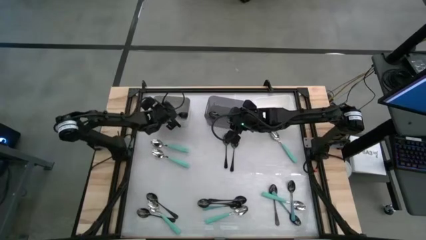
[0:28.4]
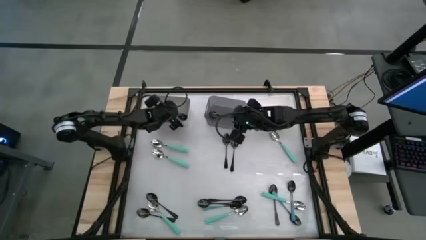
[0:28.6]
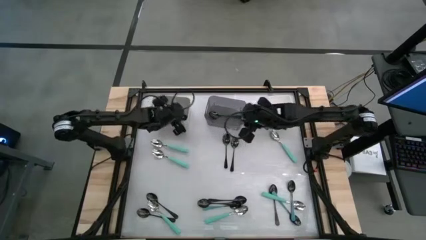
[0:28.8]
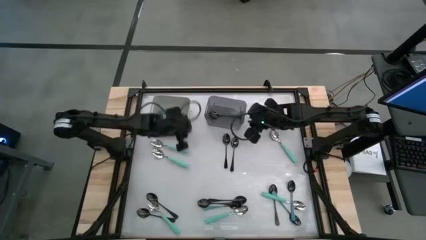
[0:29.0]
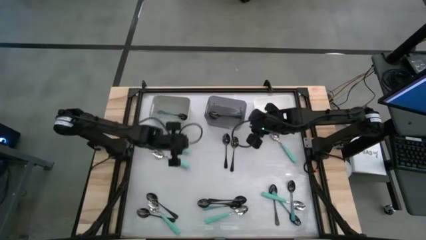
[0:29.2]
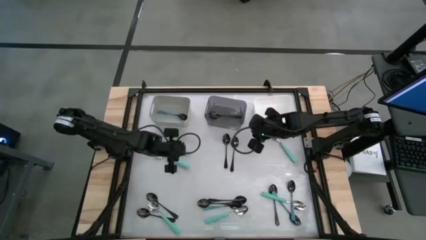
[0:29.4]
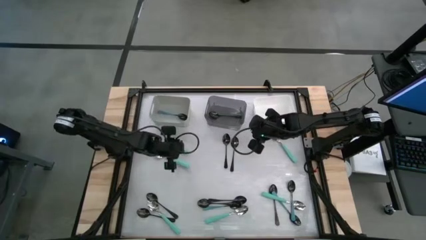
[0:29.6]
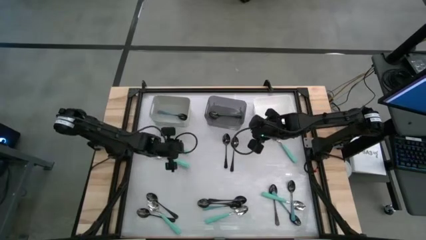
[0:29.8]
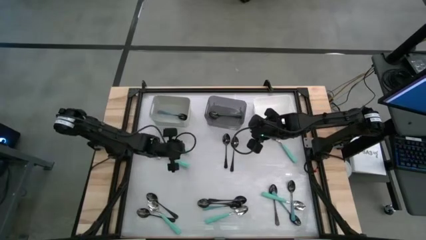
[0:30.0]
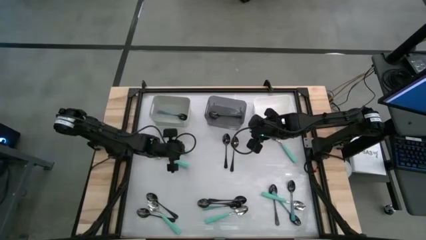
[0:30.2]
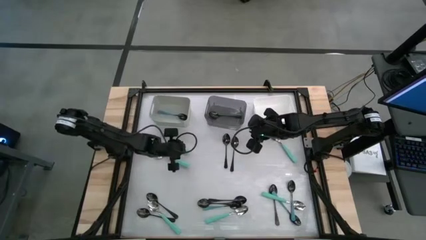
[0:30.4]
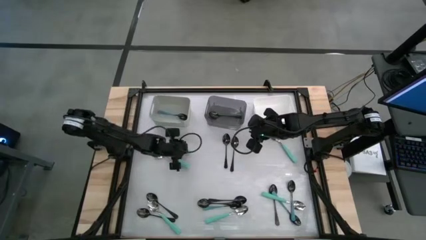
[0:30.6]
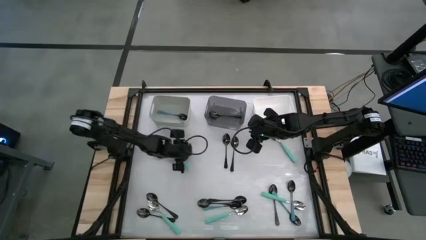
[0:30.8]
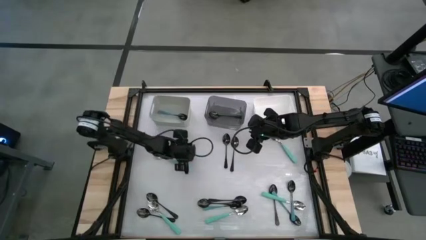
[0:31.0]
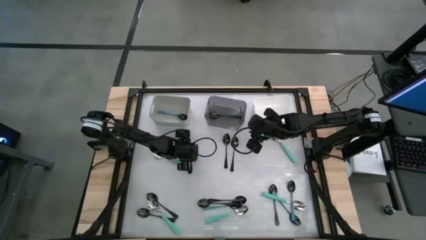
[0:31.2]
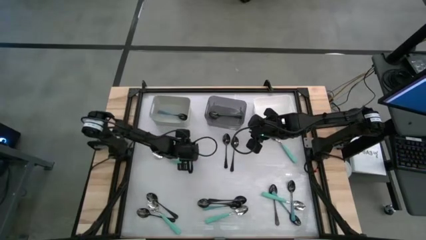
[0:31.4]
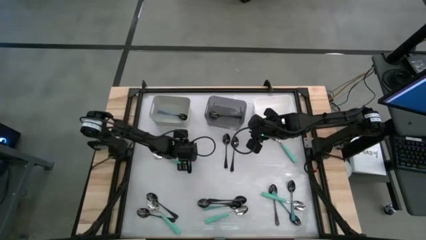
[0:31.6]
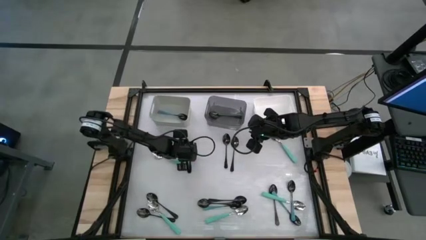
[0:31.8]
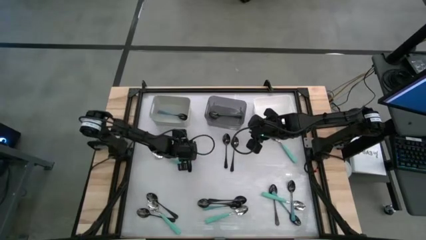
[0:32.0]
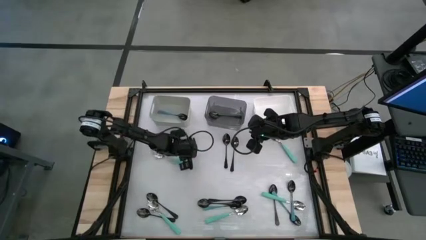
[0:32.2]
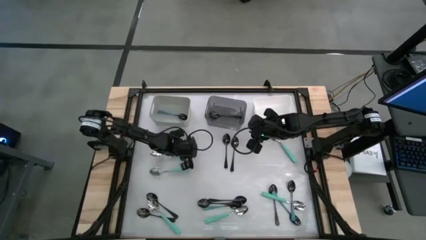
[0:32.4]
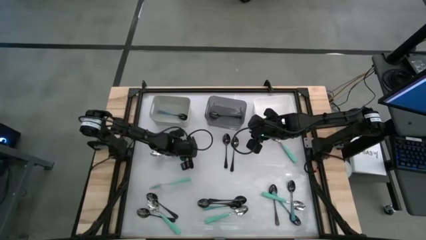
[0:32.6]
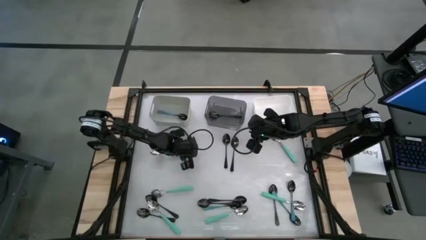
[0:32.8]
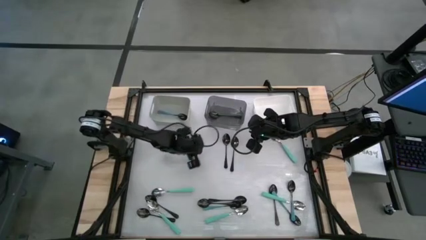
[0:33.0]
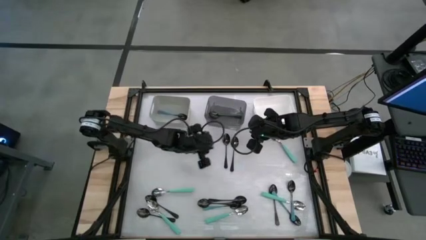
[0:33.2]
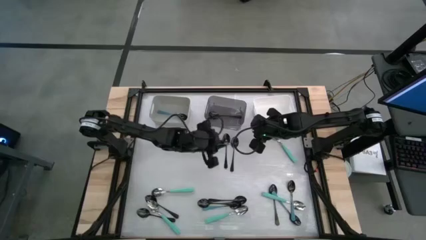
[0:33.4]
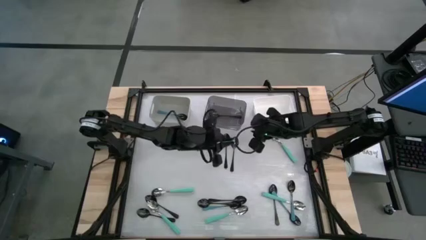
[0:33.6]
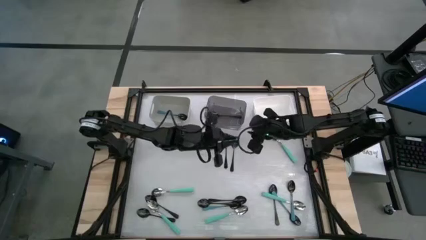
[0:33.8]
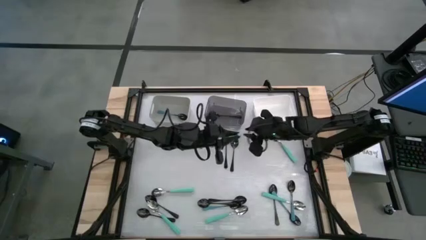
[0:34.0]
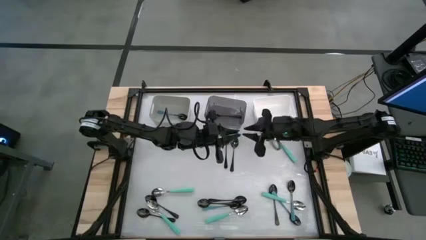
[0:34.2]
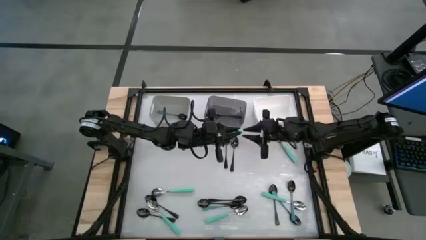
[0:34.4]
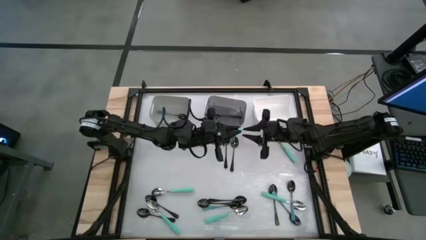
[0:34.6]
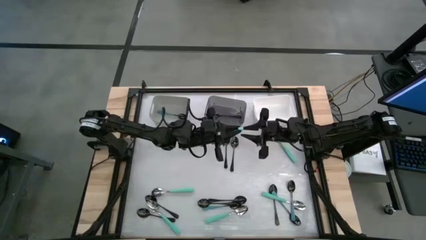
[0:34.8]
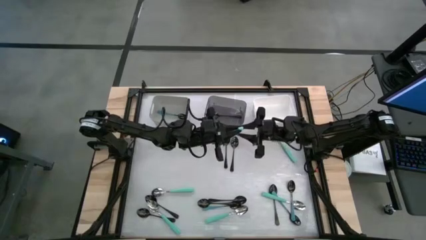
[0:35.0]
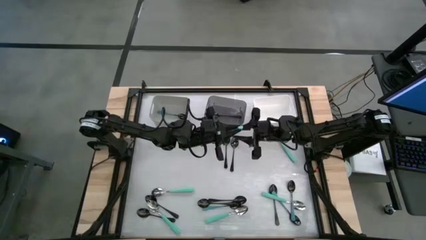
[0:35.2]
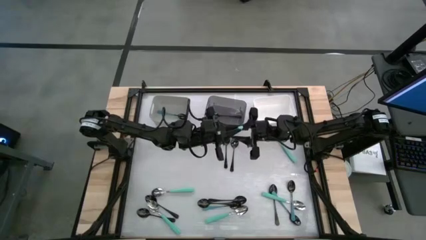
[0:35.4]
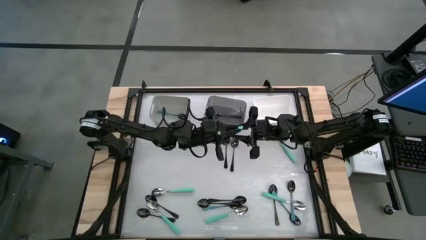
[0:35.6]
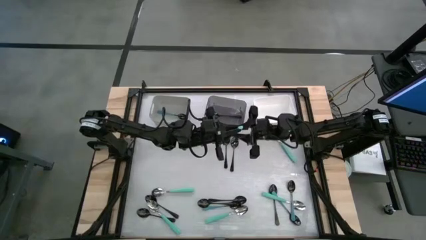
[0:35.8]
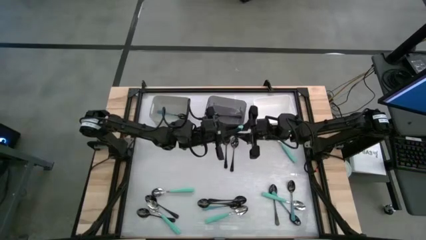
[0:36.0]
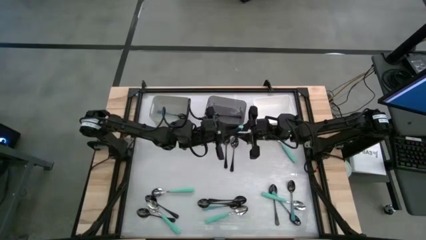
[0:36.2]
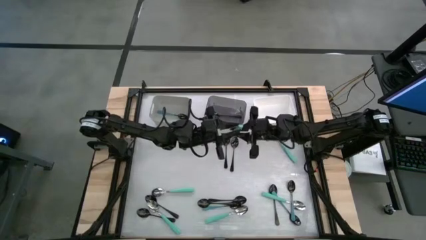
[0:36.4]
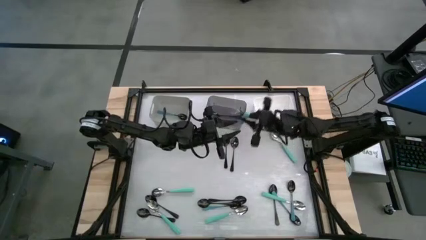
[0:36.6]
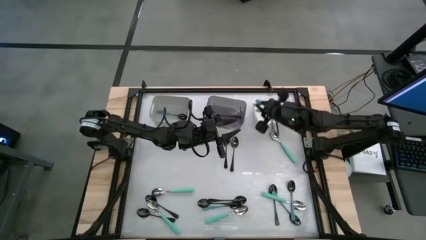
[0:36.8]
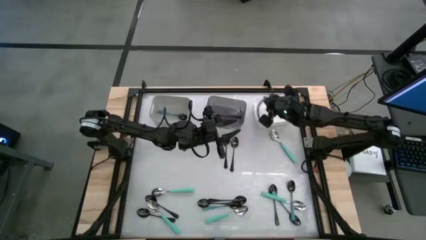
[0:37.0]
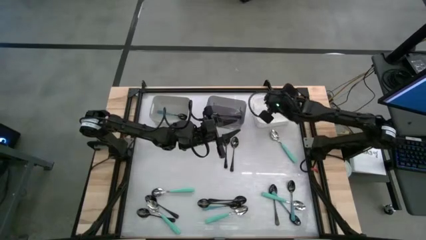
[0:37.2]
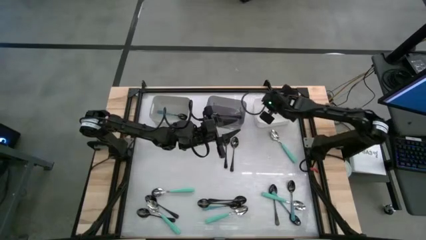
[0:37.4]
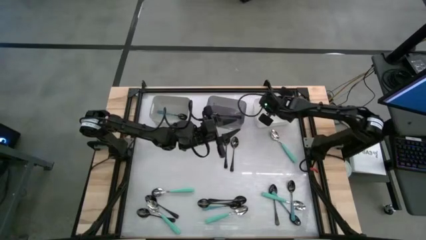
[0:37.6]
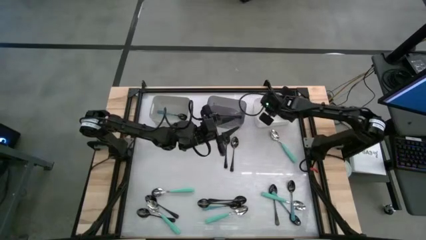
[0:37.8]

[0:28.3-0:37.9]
Task: Sort silverware by color (type)
Put the green spoon into the white bin

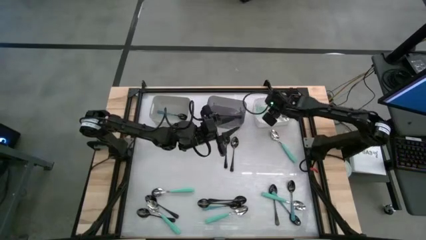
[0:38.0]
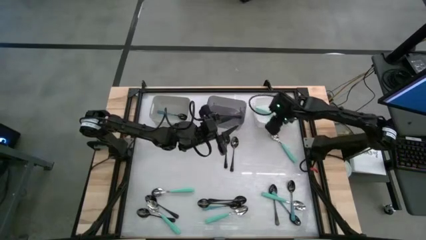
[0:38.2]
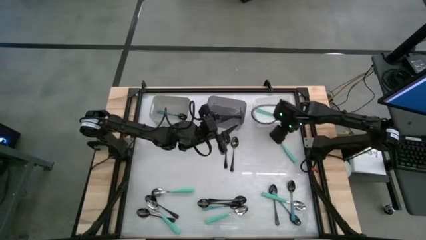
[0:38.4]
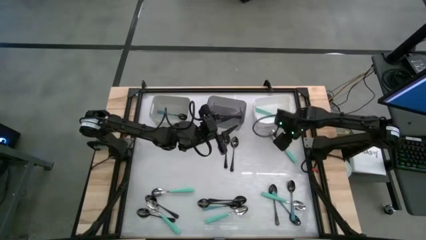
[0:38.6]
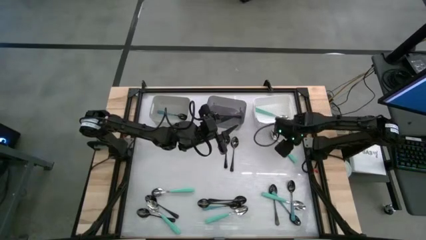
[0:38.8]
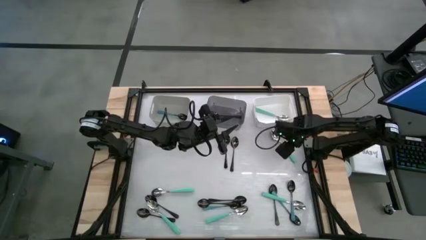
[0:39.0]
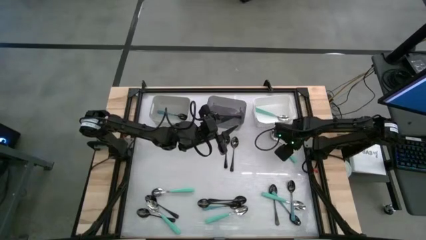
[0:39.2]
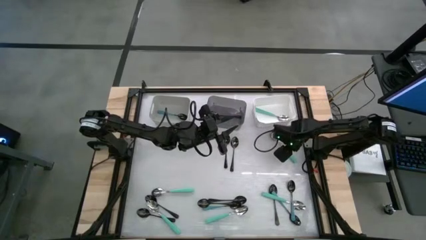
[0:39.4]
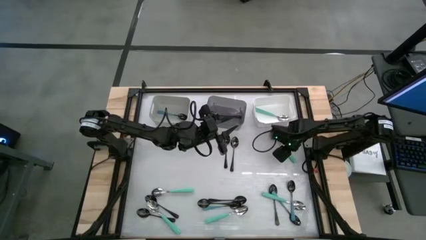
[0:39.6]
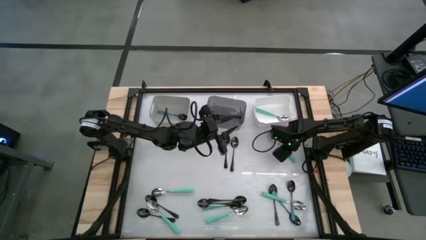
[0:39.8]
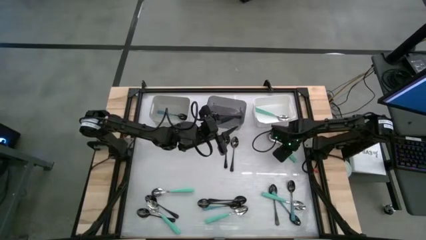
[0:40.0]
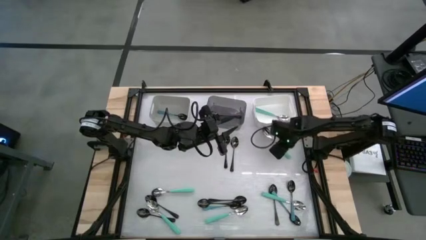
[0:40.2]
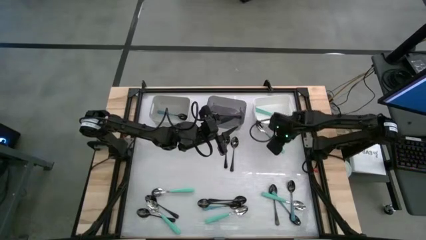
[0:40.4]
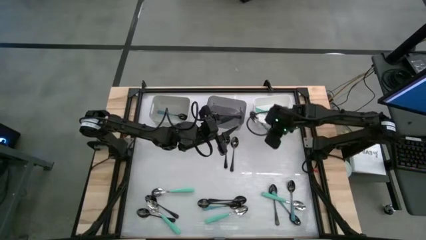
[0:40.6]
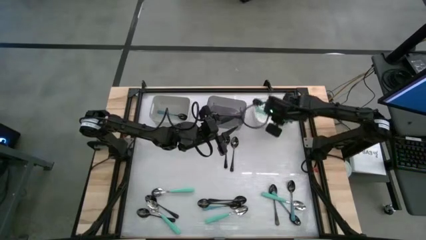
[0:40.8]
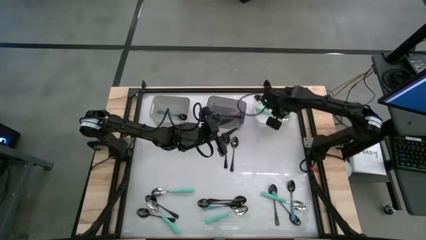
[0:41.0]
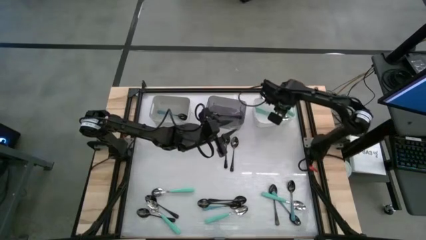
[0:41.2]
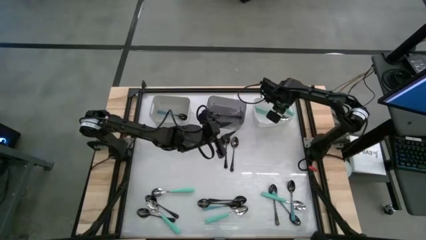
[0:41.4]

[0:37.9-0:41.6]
Put the green spoon into the white bin

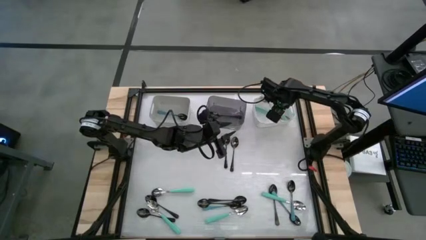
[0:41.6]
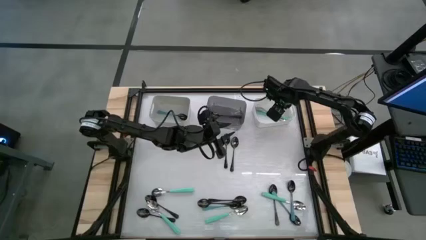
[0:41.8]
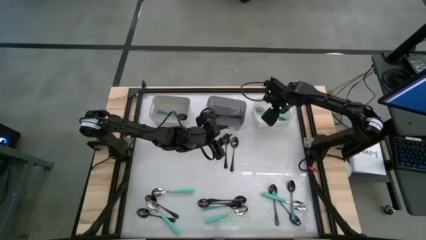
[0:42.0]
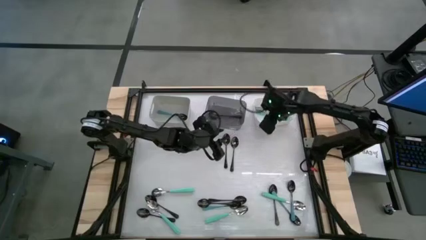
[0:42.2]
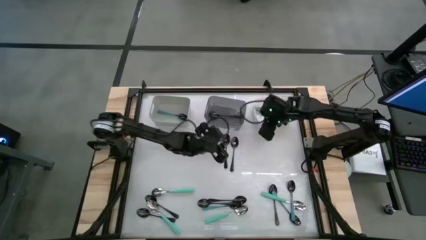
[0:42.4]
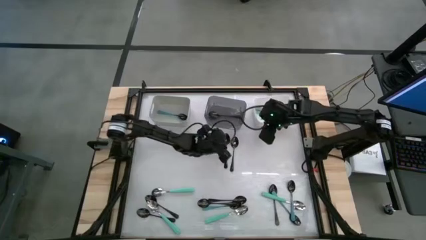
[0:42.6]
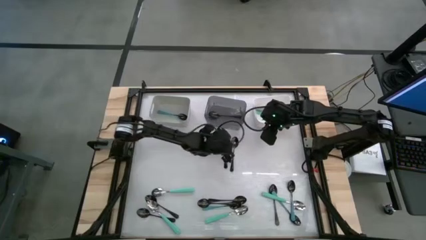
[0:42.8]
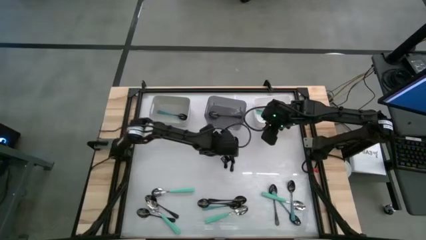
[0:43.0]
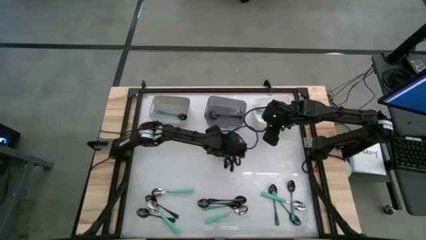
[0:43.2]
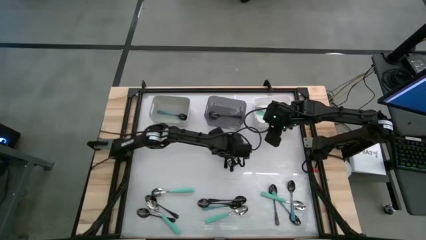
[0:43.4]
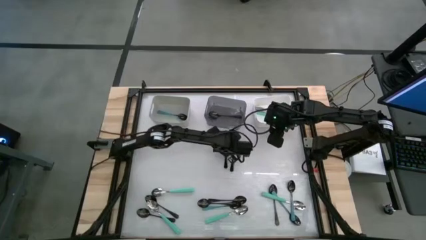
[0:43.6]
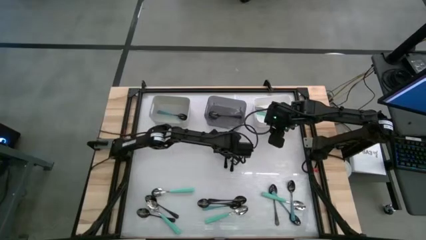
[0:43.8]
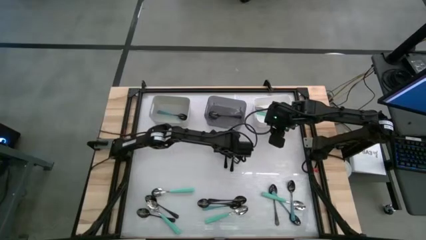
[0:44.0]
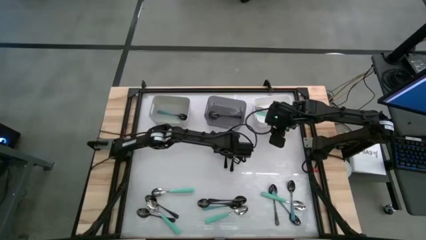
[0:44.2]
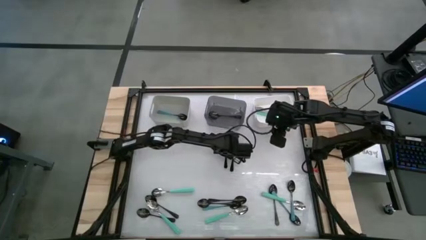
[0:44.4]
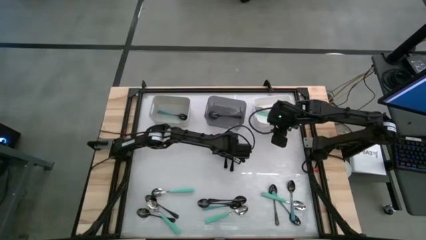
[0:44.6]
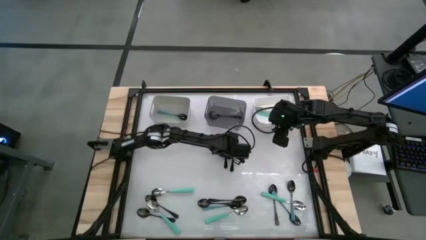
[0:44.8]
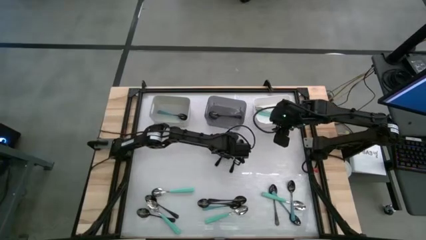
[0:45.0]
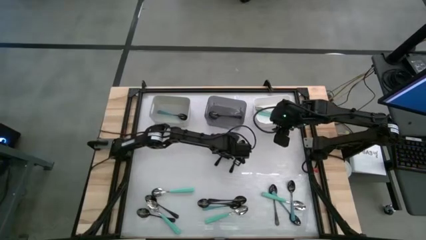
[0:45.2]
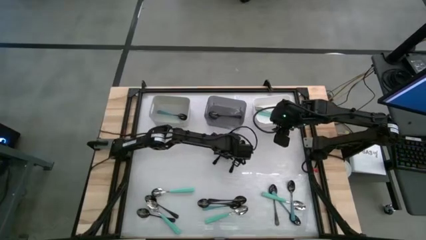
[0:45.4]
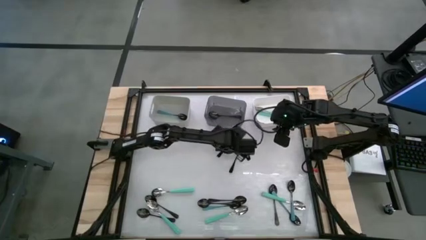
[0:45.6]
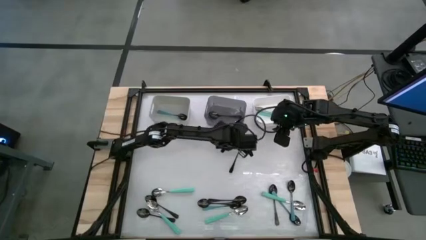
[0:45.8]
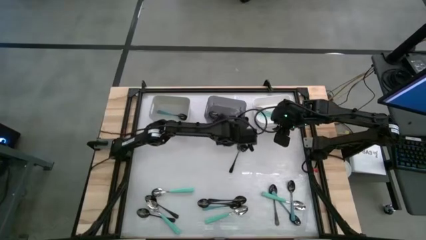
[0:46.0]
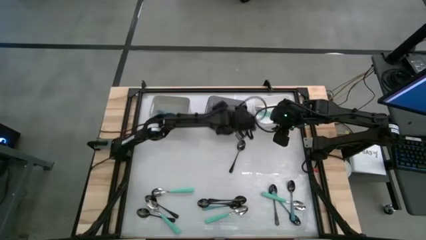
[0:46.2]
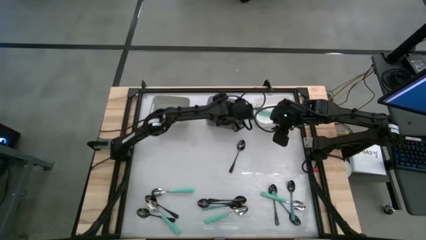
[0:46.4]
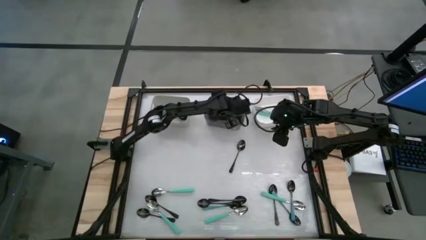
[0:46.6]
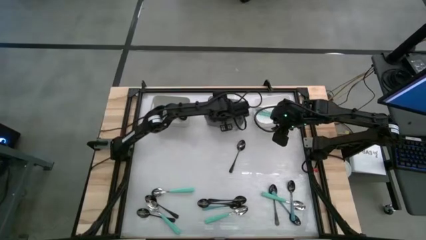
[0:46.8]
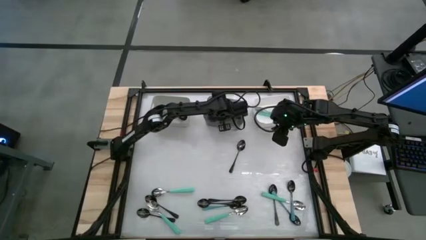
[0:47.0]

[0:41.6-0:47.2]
Put the black spoon into the black bin
